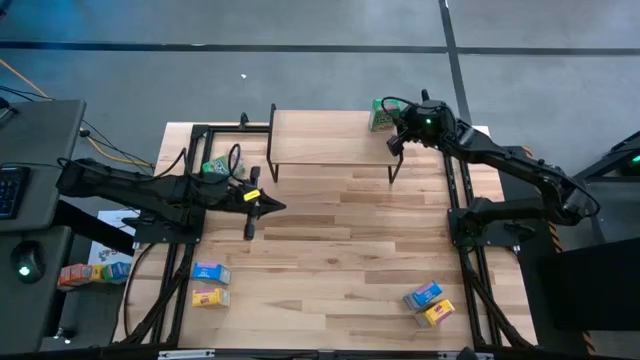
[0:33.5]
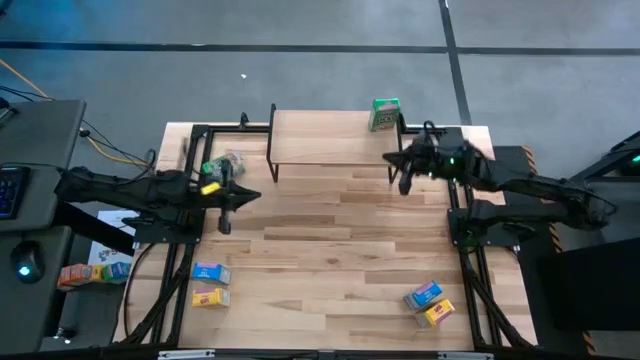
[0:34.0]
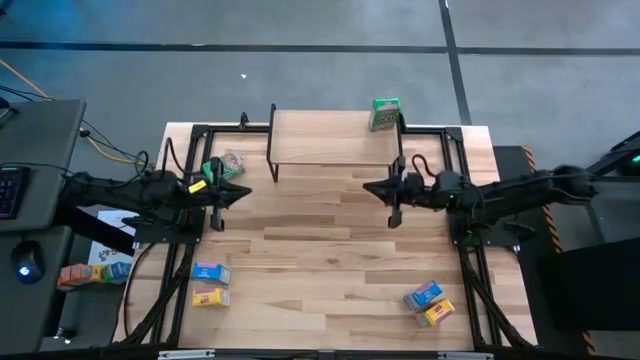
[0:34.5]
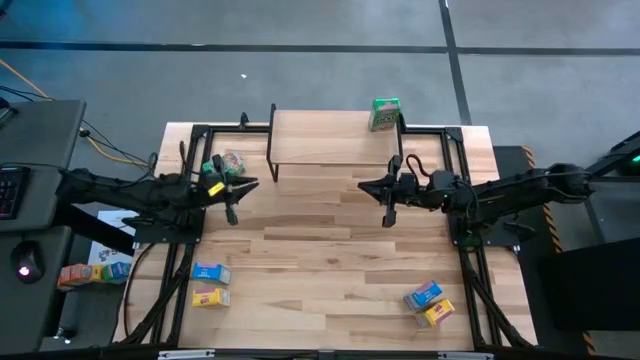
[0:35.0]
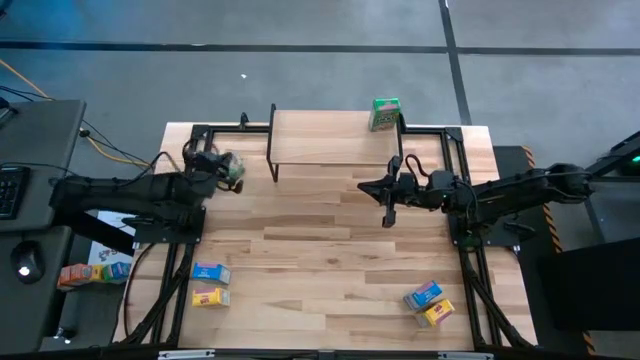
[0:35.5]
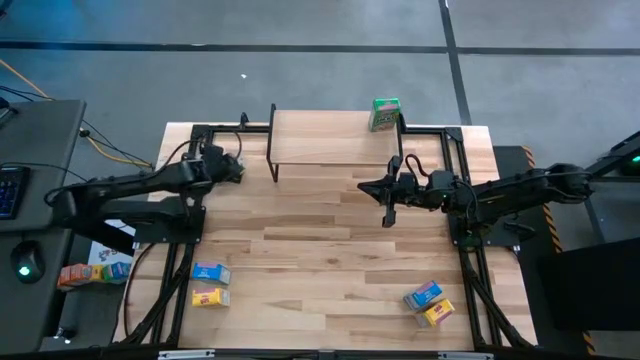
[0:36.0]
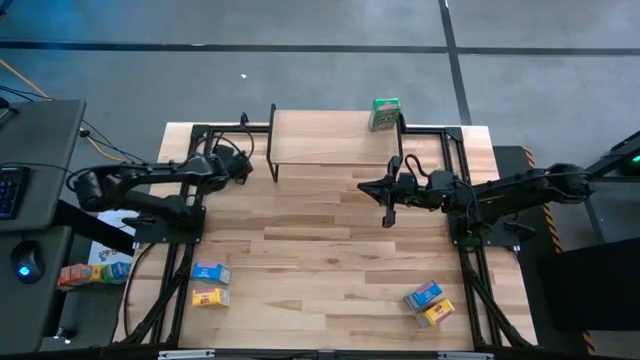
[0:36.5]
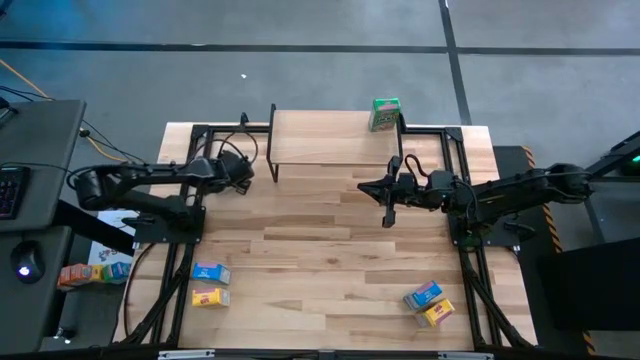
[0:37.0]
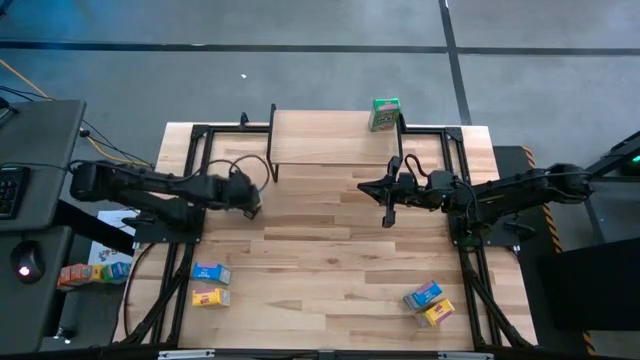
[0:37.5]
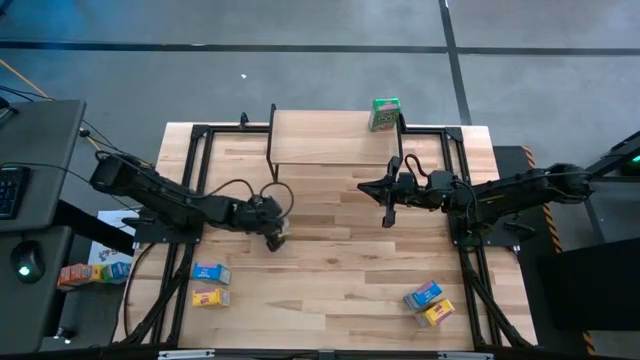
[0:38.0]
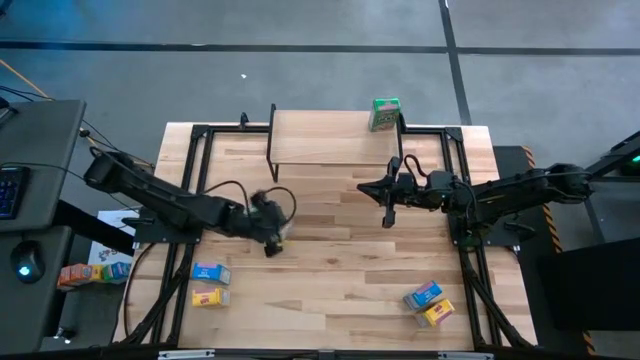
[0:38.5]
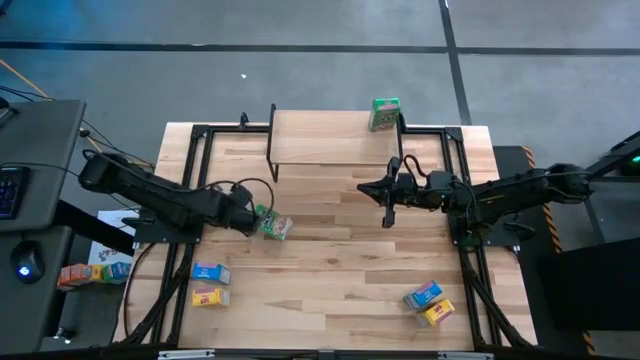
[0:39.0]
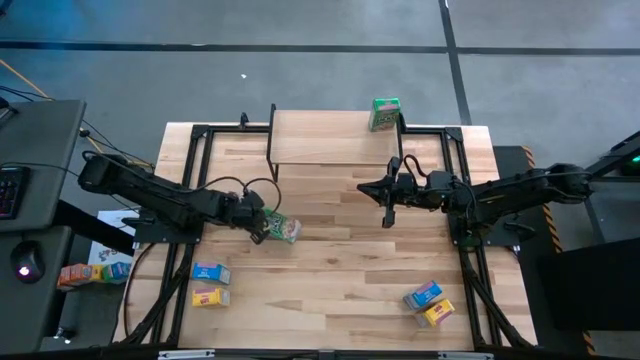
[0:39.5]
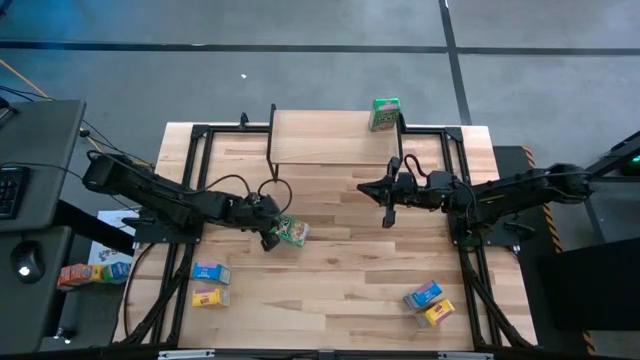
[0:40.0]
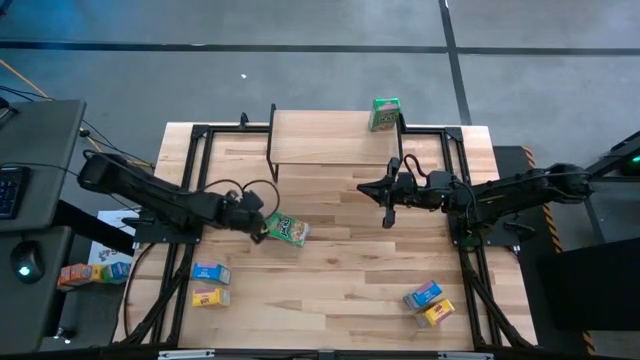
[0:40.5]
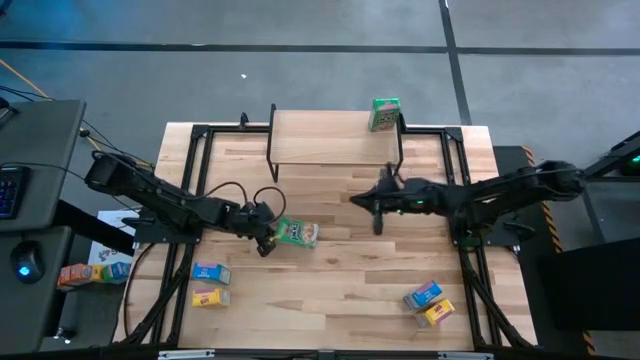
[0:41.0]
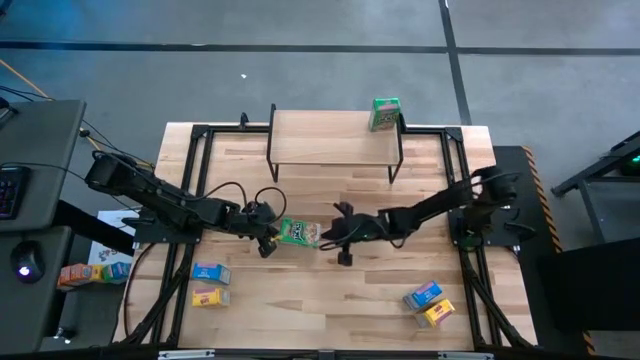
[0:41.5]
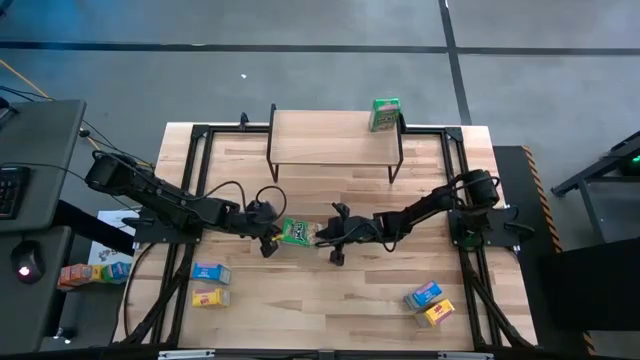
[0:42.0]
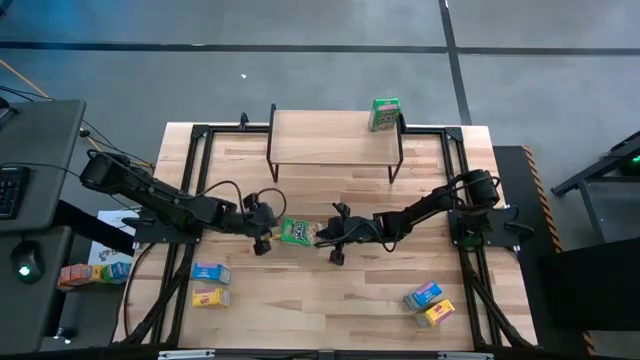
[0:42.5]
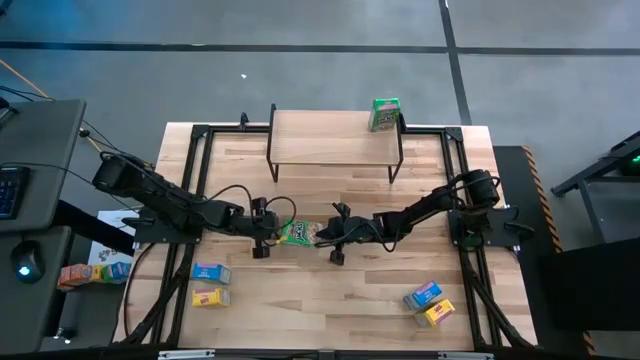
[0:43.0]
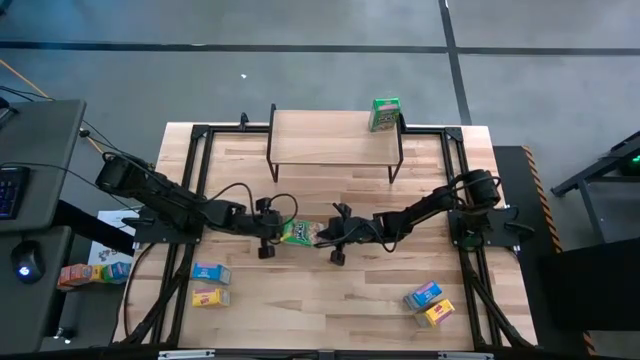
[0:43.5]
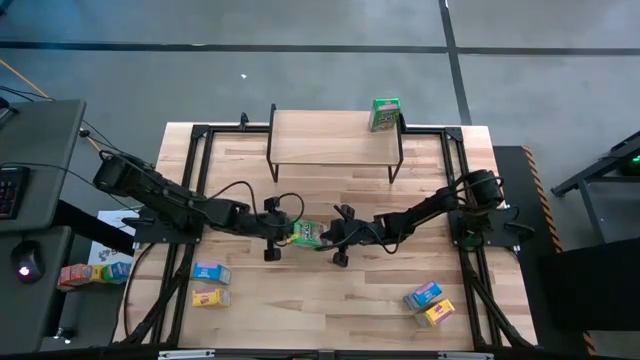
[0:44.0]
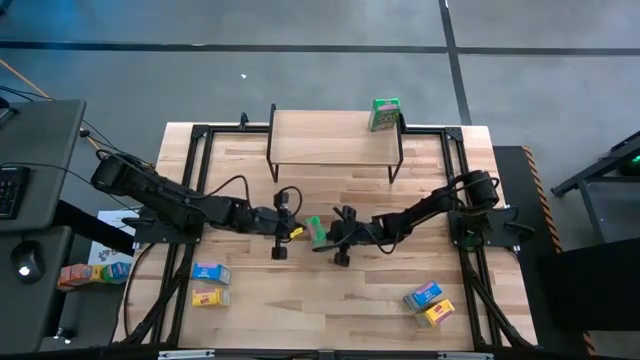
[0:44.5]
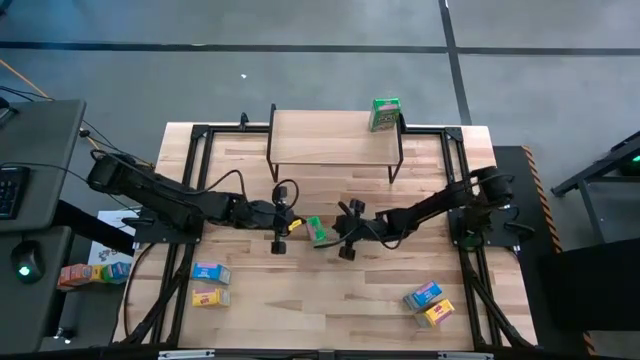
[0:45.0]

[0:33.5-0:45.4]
Task: Stack cereal on shelf
Move the green cereal box to the center of the table

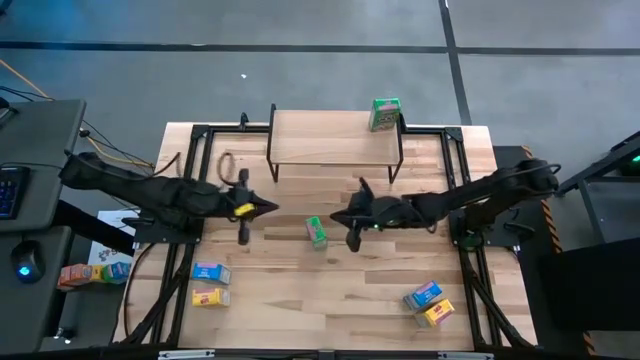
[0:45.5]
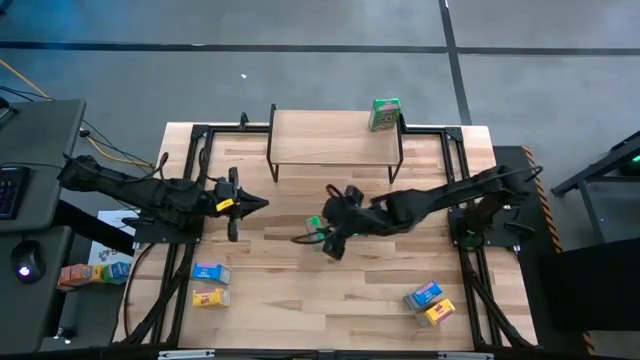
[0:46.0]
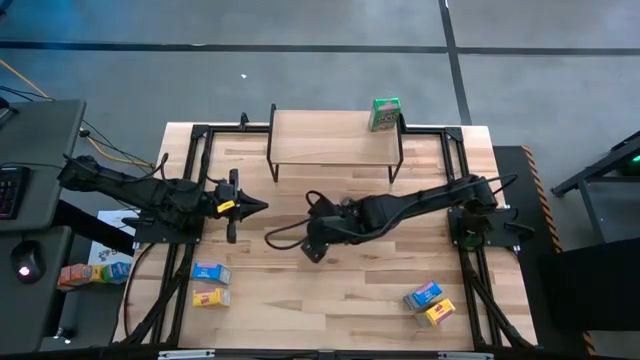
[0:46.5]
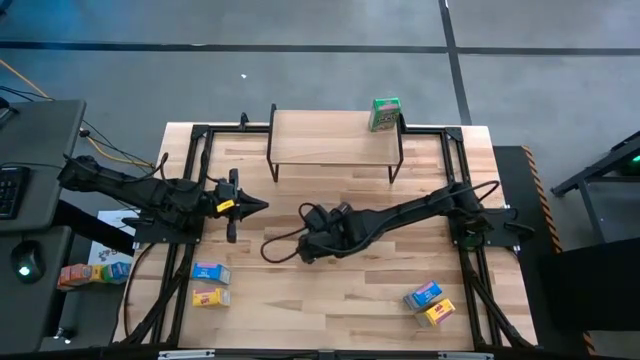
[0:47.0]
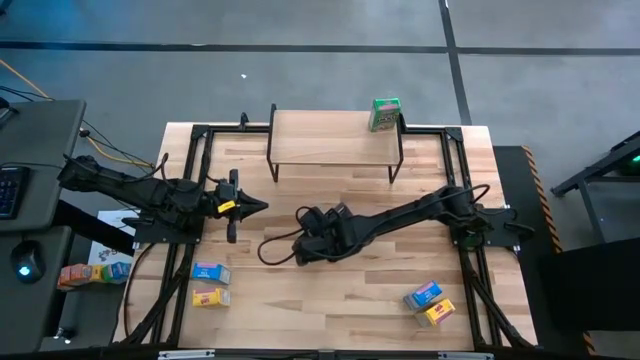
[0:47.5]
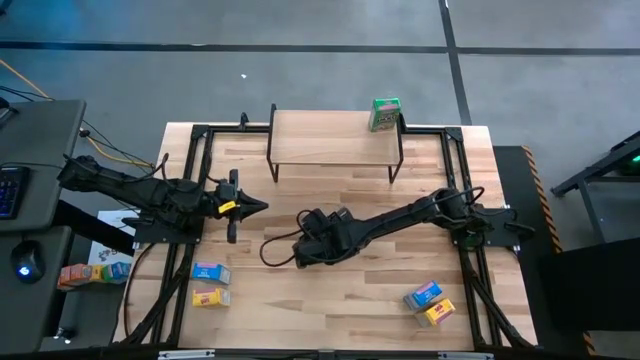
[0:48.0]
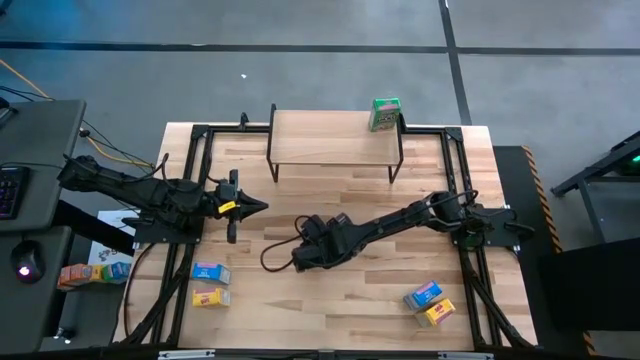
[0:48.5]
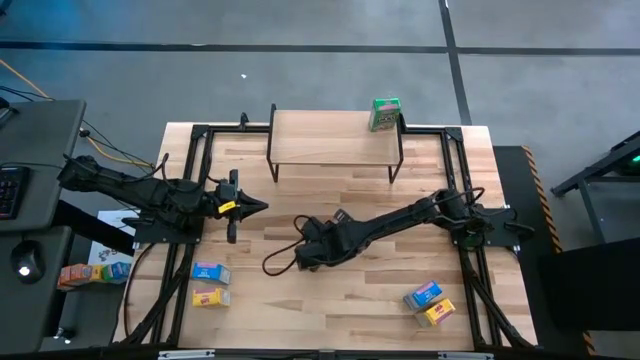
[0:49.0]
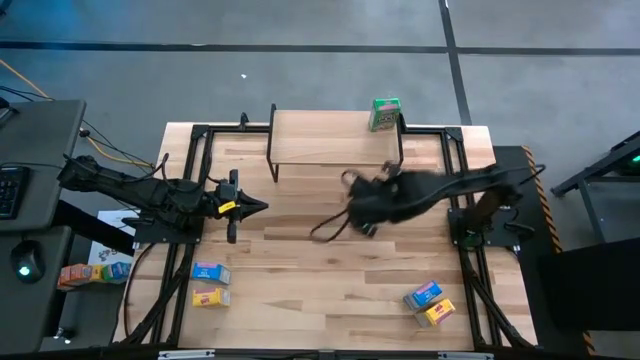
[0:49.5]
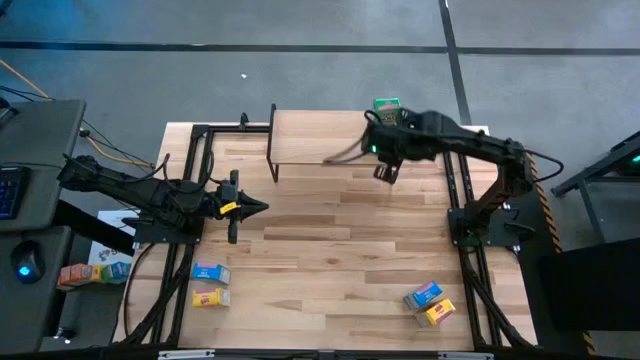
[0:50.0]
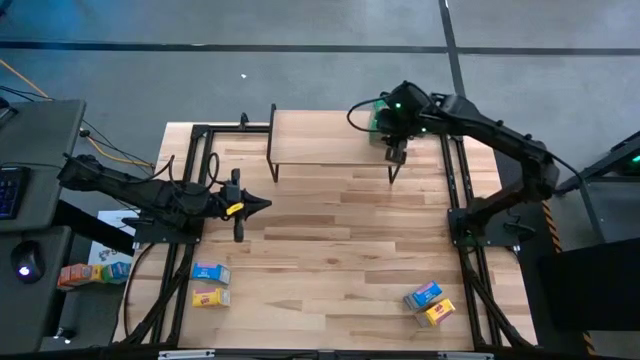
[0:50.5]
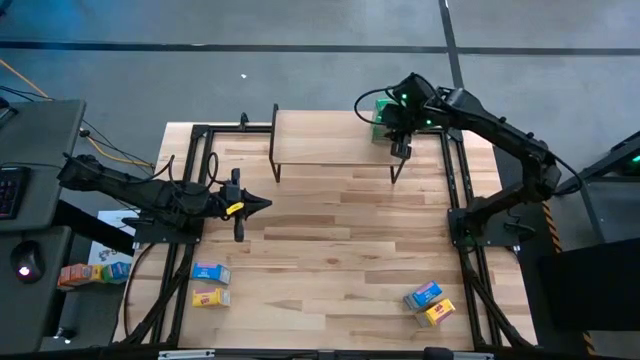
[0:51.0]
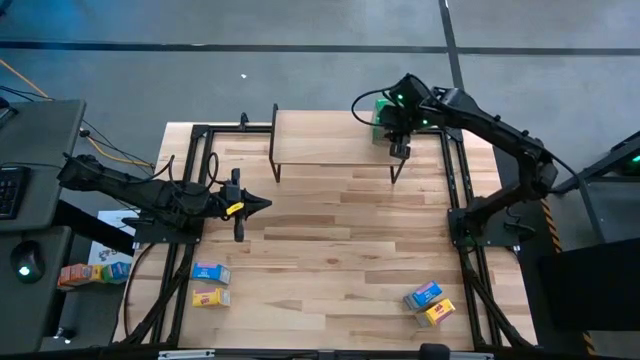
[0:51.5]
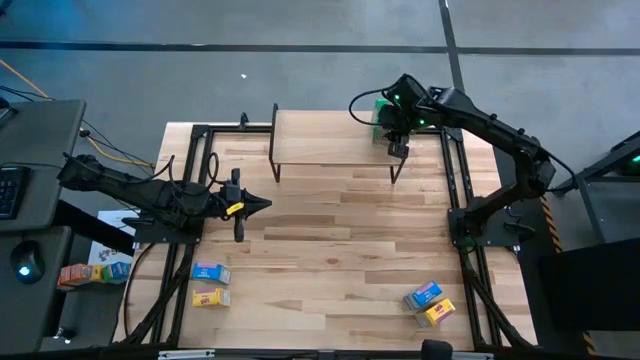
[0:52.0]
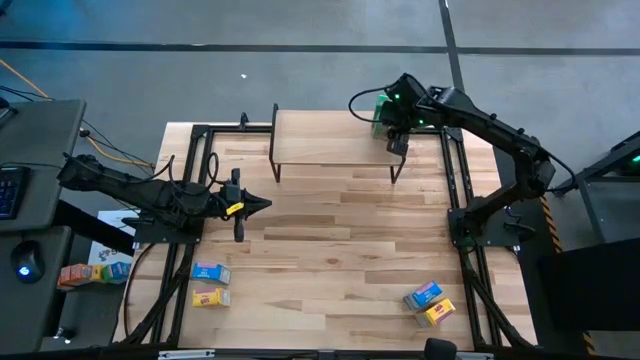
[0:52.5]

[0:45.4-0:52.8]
Put the green cereal box on the shelf

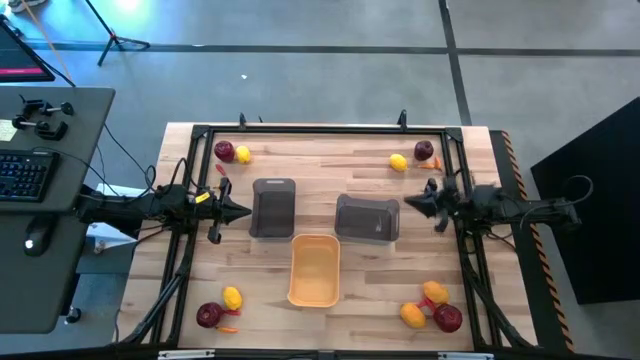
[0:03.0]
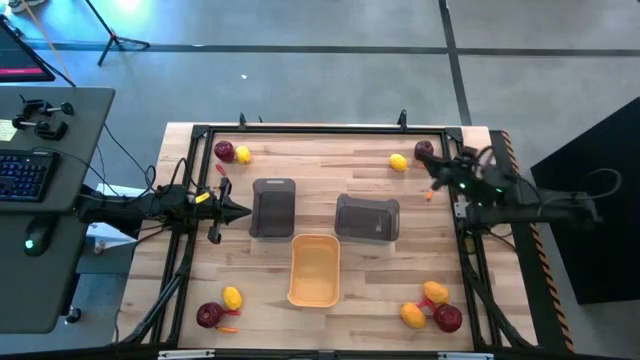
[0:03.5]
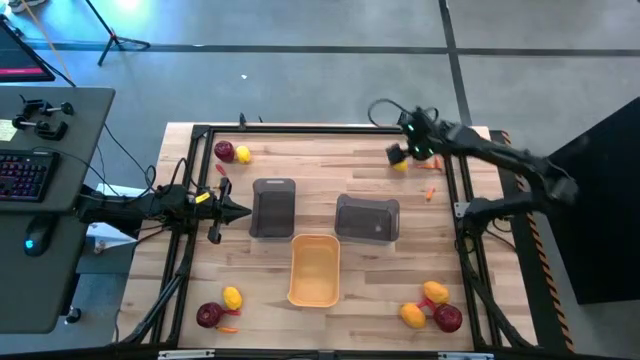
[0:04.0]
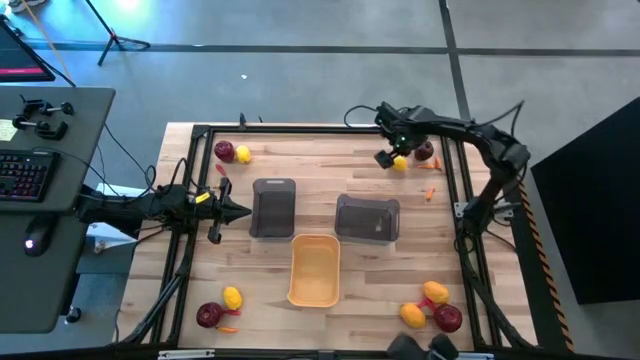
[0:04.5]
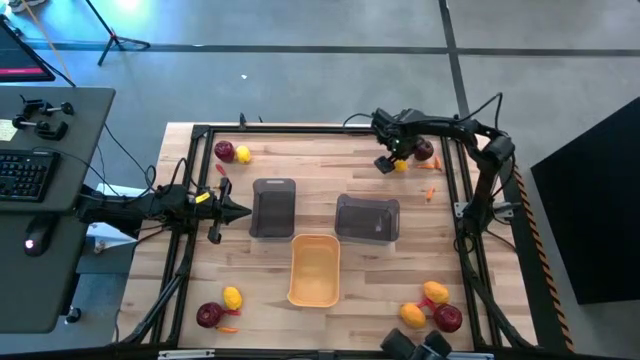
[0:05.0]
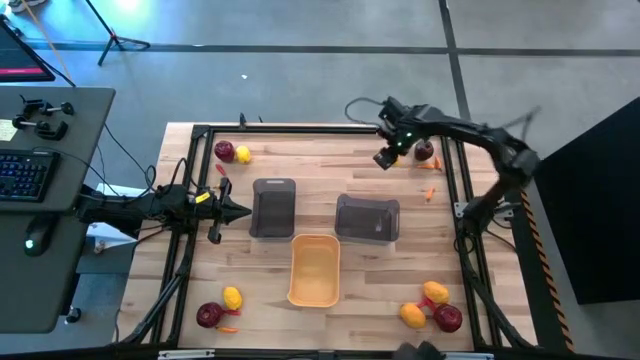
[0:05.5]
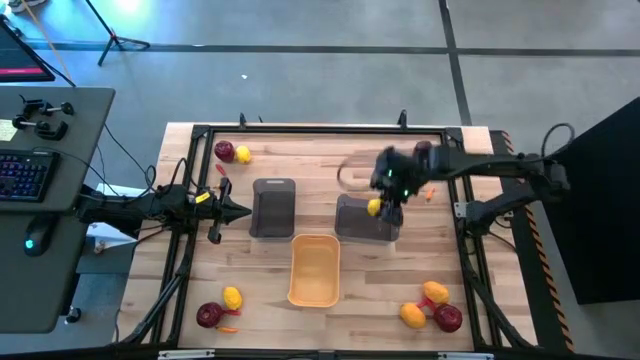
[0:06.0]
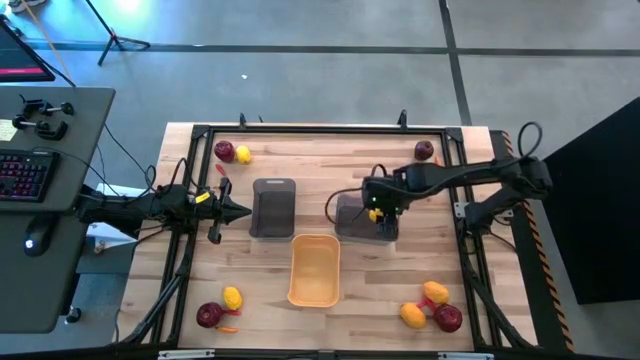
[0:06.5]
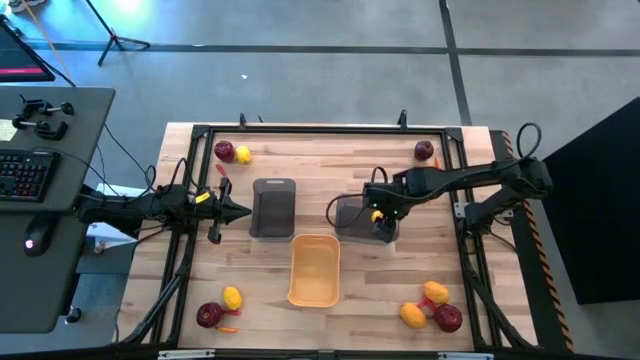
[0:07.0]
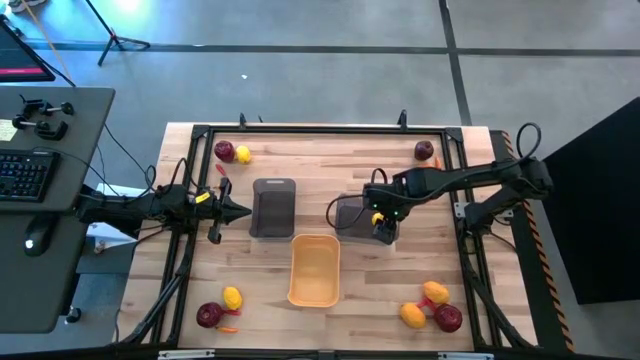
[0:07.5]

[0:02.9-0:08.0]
Task: Sort produce into baskets
Put the lemon into the right black bin
